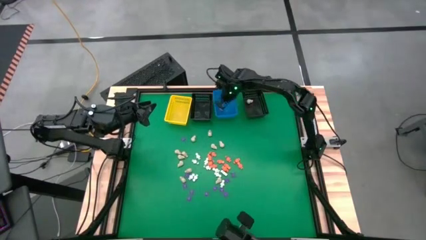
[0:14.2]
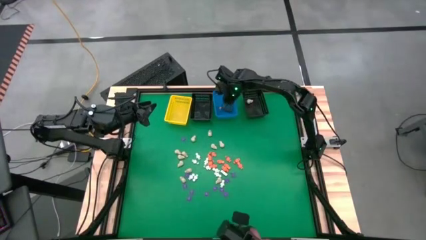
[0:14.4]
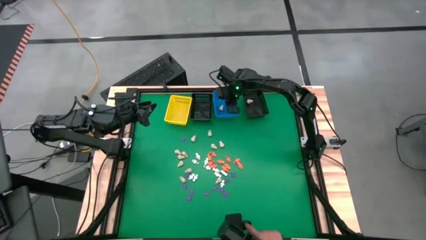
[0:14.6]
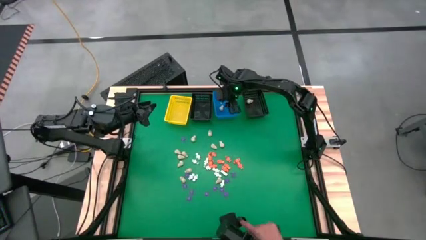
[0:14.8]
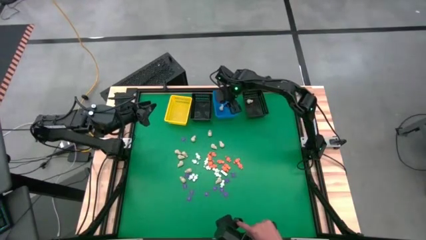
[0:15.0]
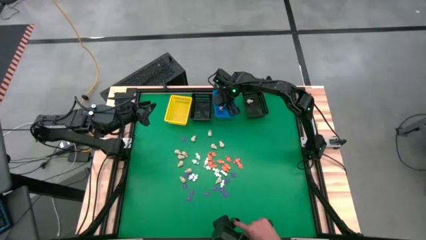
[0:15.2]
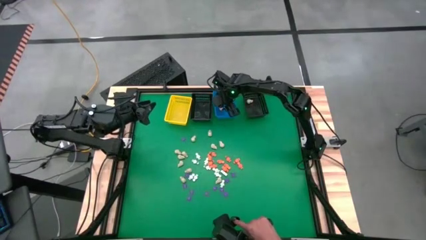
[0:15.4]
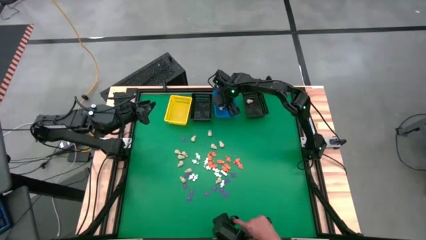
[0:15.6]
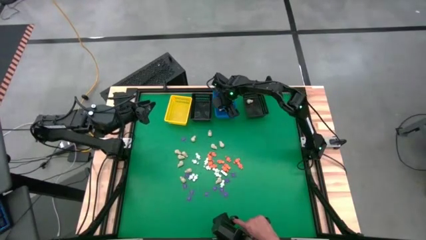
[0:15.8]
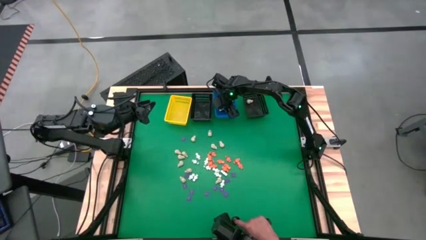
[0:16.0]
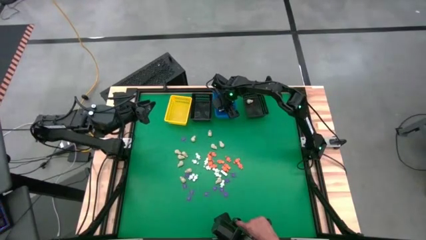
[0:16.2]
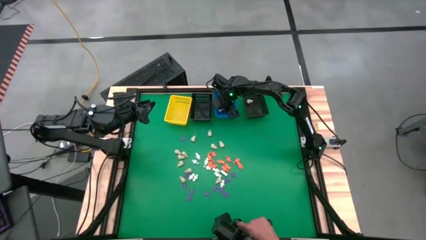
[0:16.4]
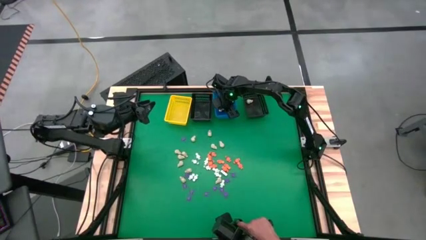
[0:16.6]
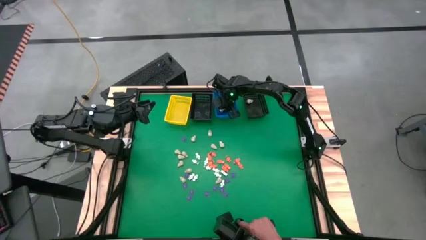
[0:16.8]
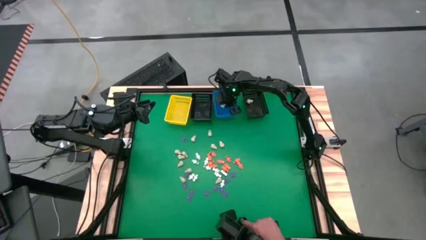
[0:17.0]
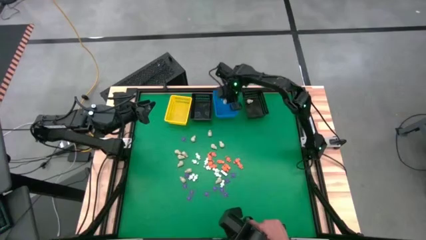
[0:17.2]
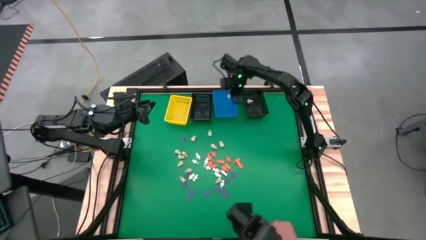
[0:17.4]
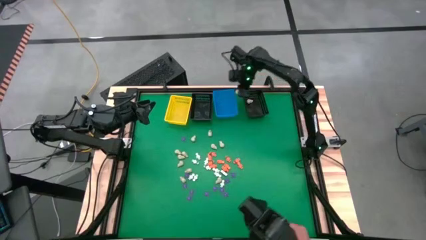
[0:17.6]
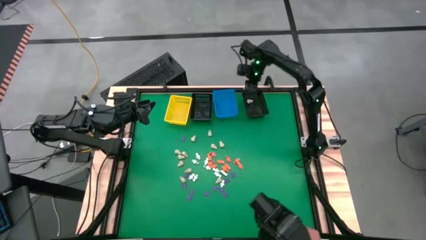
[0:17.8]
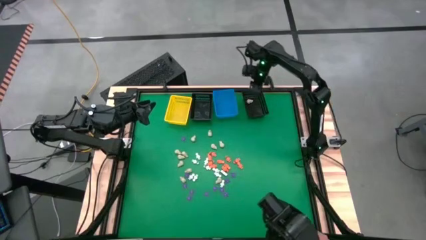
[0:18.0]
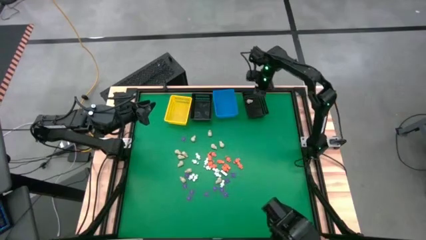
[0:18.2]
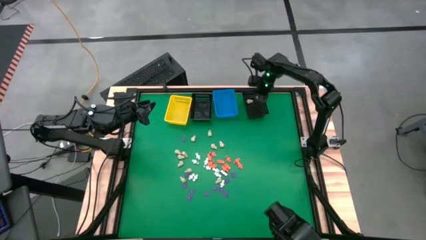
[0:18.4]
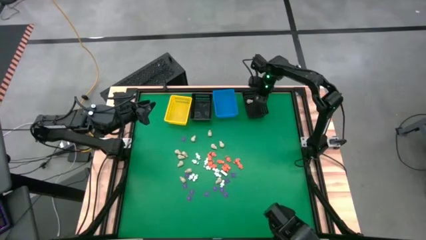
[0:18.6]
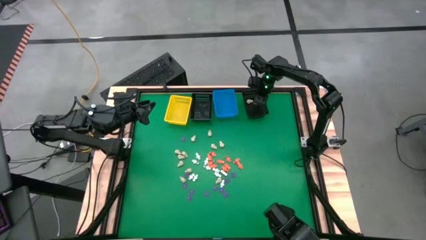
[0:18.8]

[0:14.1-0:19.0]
Task: Sort Halloween decoration
Put the white skull toy into the right black basket

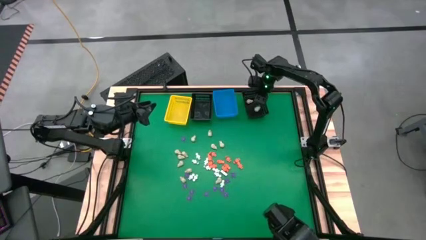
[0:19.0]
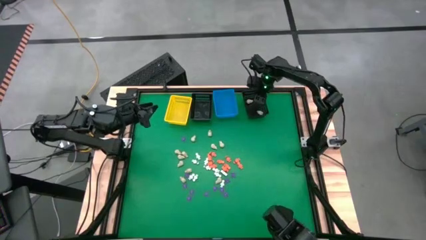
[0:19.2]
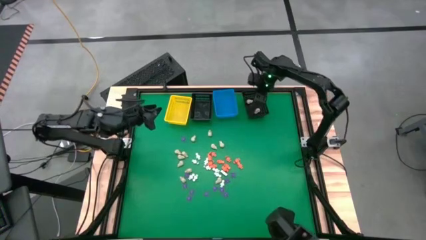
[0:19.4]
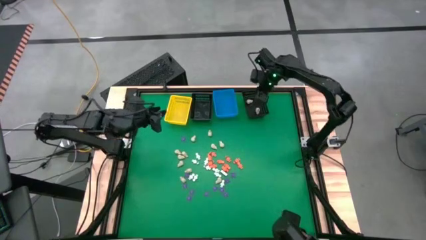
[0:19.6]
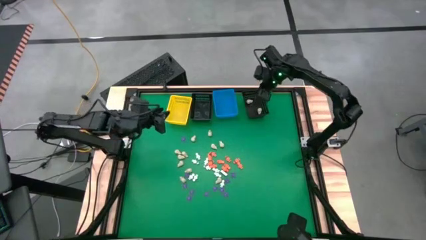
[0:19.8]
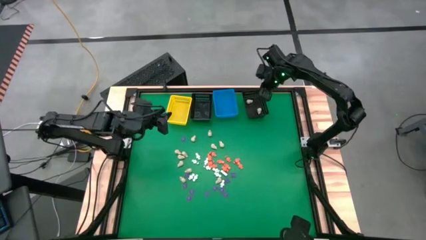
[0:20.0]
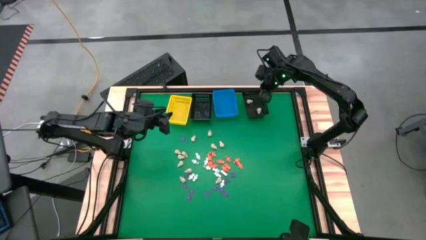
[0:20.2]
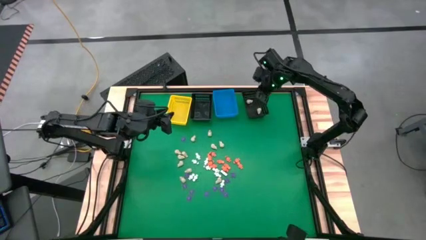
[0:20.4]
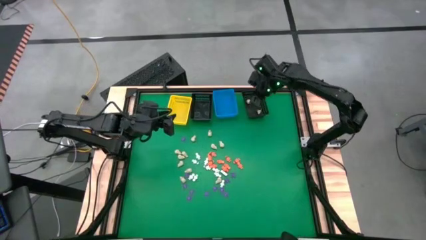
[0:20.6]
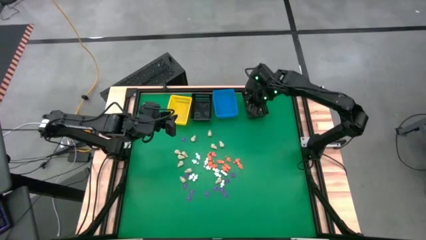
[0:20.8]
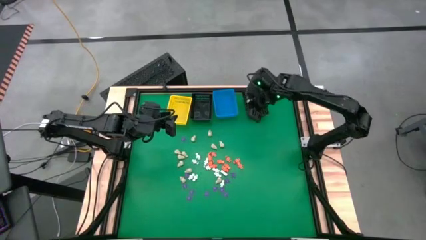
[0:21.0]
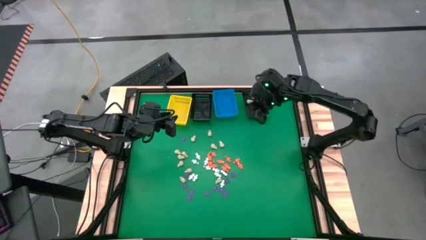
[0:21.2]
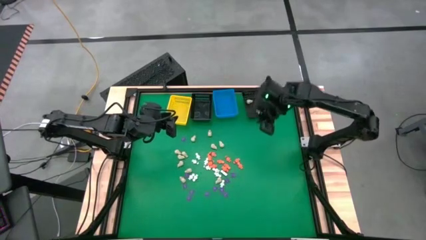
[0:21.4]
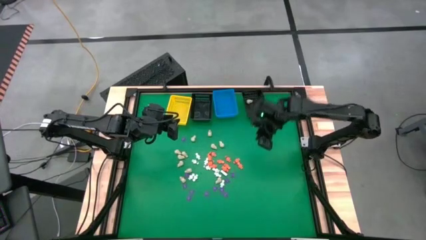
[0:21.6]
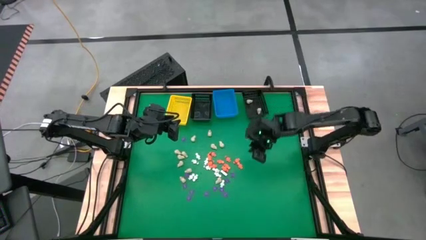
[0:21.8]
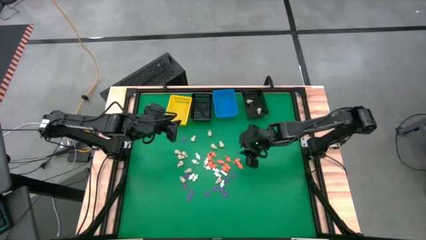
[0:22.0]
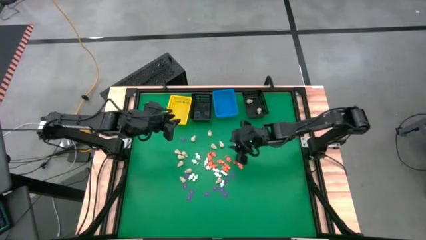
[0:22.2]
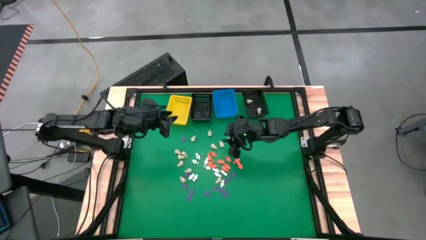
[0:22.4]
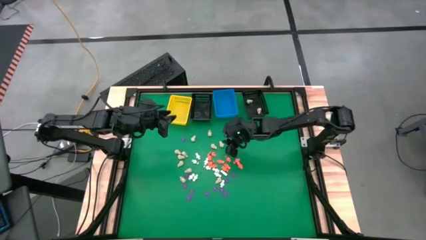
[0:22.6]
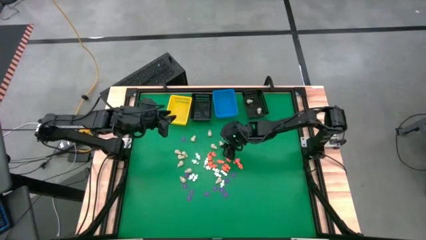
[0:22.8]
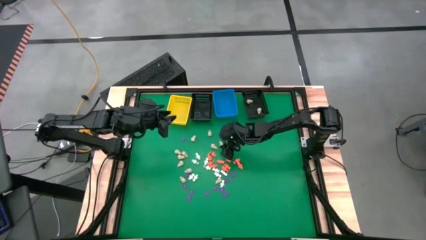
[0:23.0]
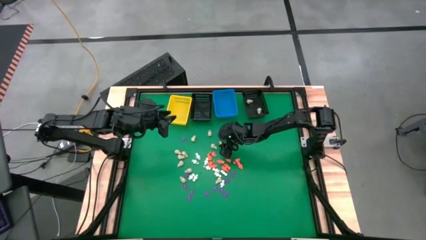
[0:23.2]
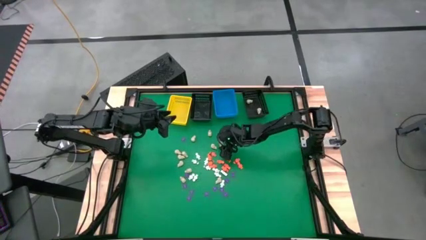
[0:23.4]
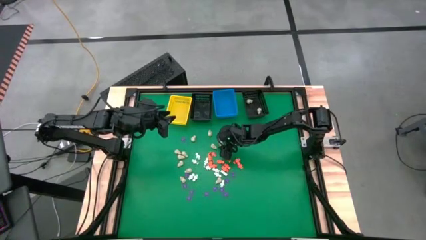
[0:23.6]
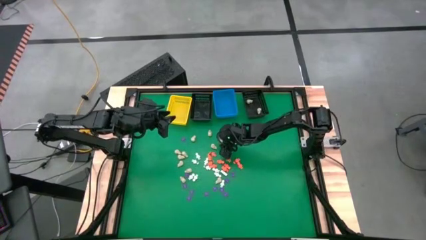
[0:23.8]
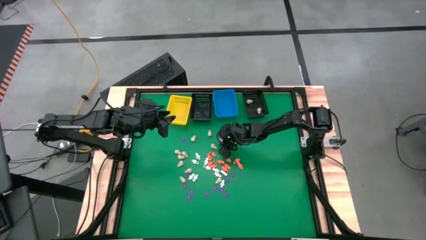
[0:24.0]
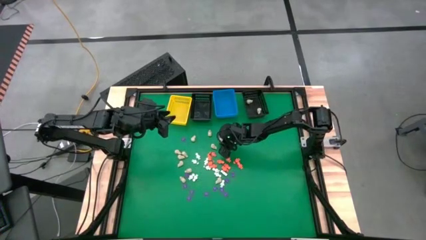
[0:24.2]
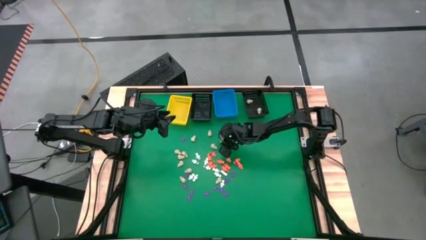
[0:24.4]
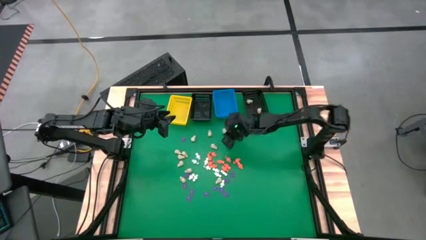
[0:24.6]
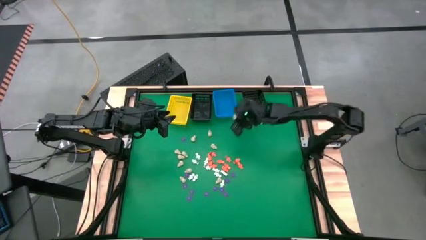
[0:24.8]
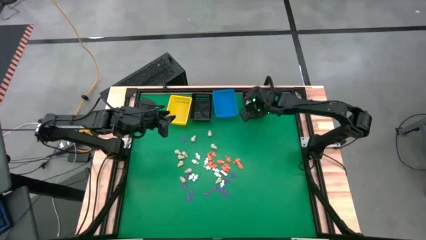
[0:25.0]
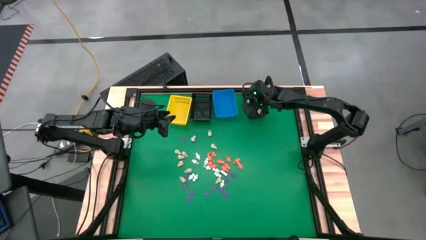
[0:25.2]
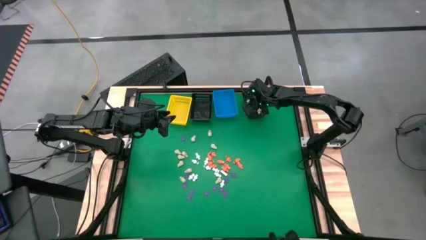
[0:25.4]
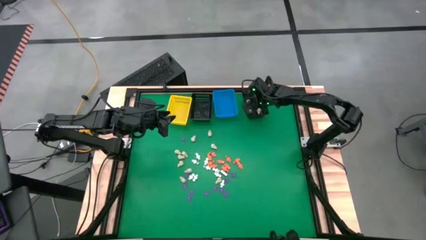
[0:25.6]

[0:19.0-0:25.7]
Put the white skull toy into the right black basket

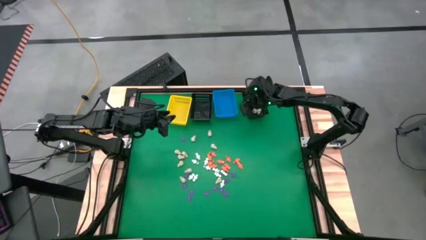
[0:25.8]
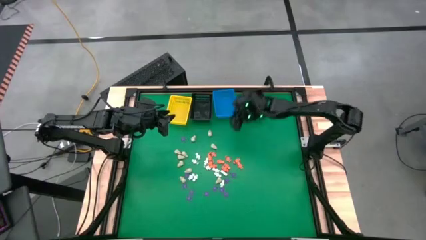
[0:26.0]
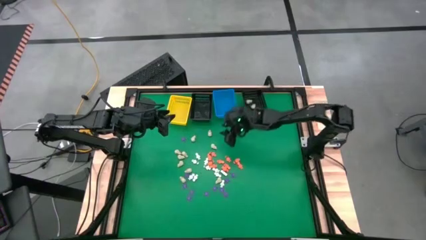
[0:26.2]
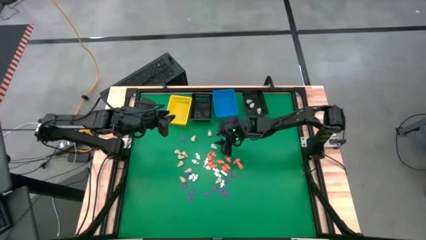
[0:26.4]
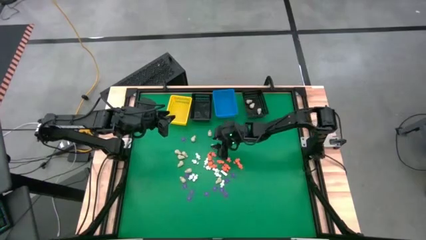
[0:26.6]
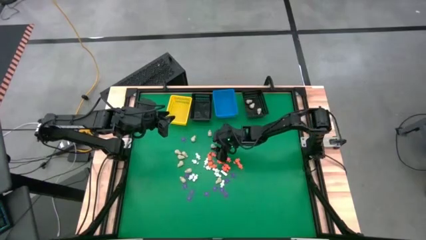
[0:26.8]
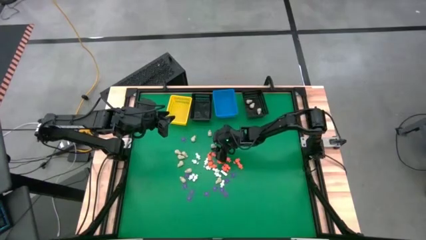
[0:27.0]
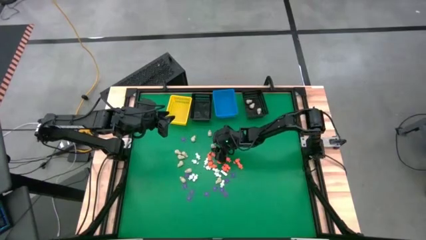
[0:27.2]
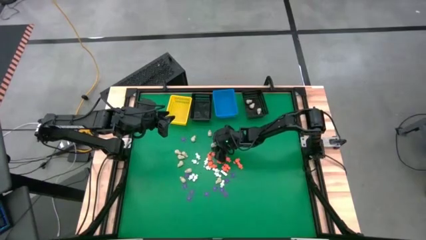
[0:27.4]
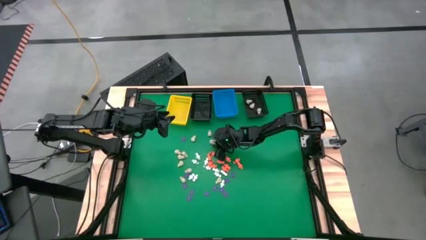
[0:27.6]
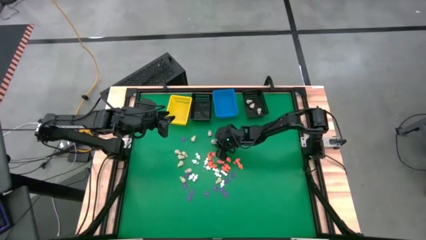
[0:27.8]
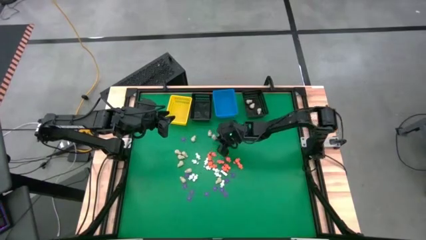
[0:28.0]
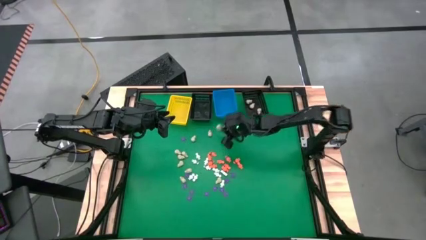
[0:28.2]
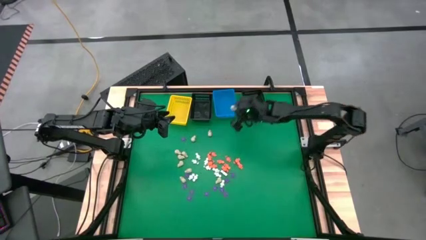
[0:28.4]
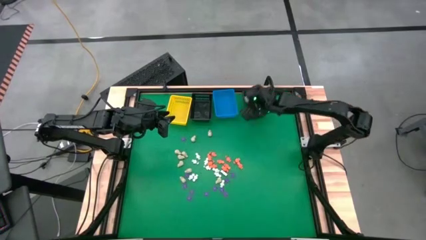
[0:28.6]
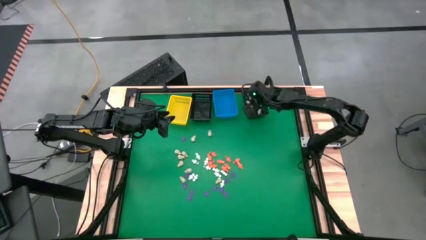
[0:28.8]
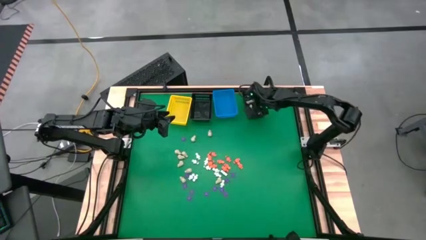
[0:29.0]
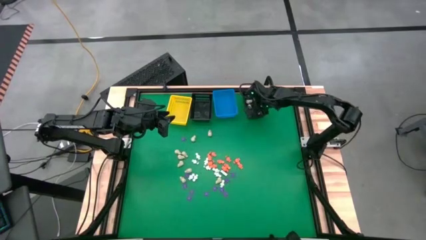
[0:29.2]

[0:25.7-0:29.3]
Put the white skull toy into the right black basket

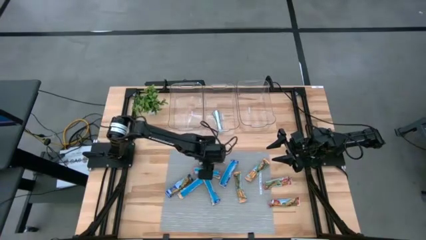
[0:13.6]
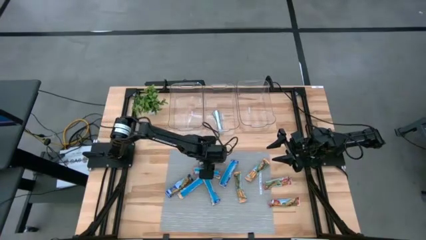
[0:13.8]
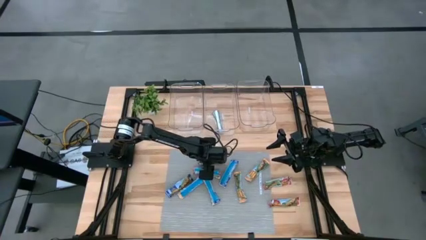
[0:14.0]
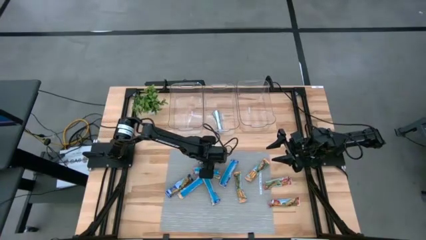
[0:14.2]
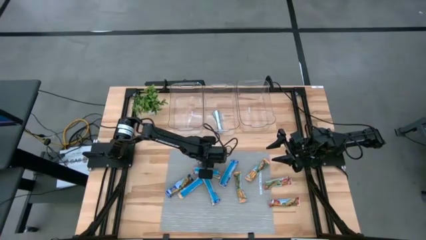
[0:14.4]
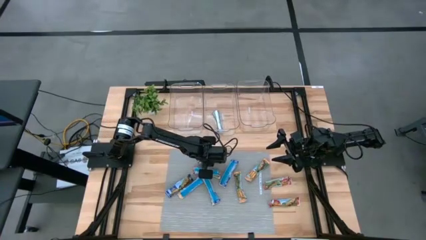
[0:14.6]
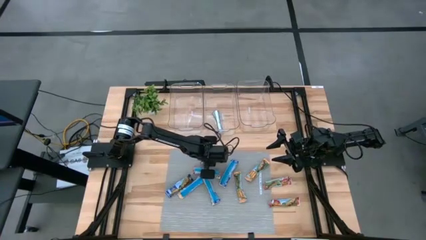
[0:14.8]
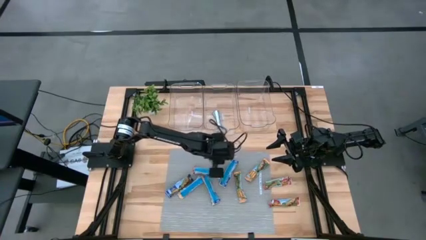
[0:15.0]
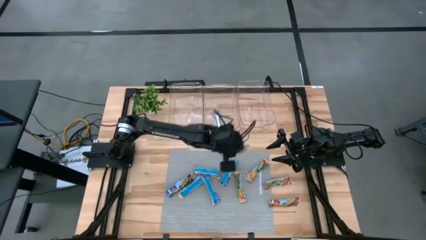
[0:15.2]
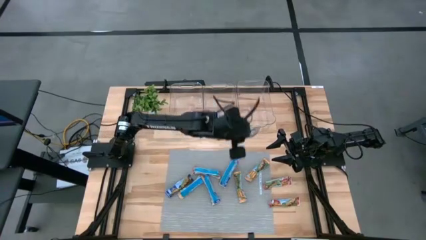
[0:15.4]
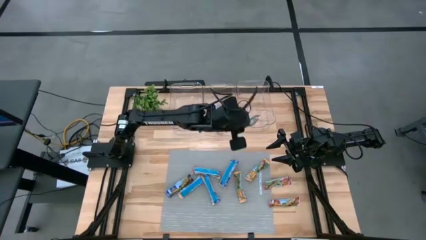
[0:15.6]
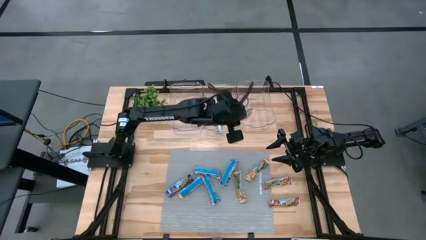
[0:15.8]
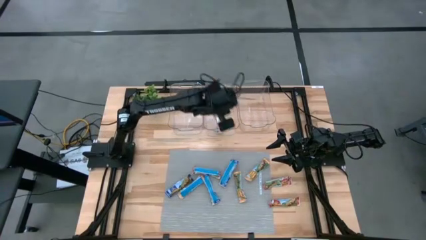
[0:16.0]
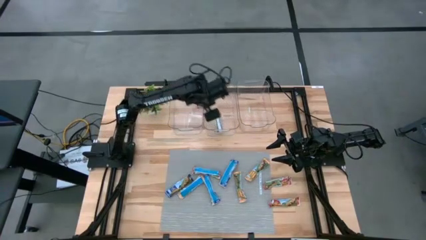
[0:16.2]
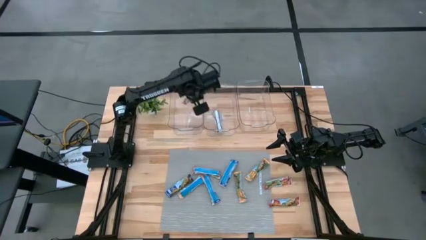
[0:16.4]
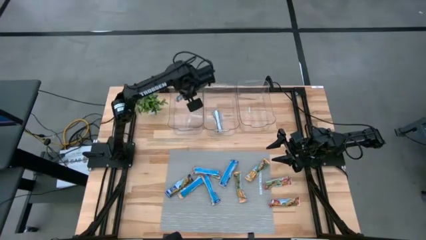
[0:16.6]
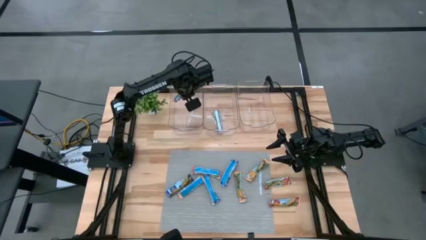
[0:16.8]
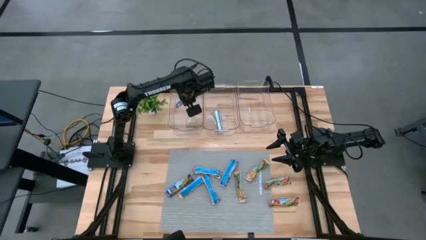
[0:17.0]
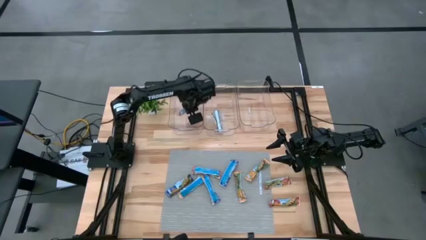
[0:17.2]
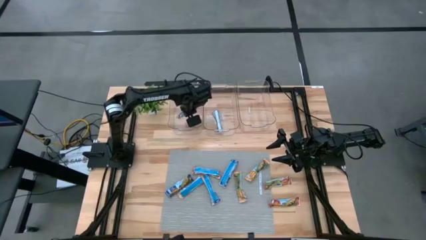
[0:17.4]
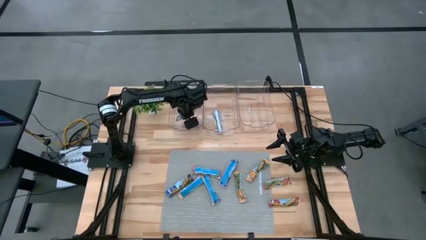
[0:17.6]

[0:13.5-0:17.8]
Task: Pick and place Granola Bars by type
Put the red granola bar into the left transparent bin
